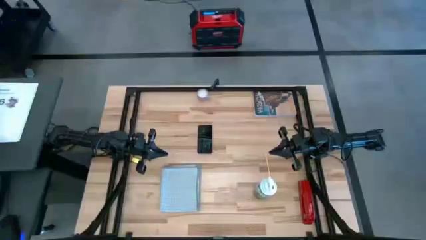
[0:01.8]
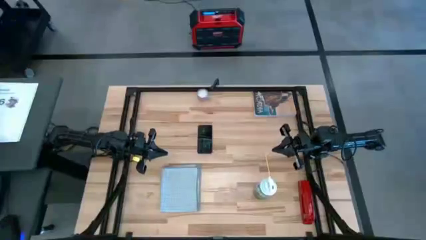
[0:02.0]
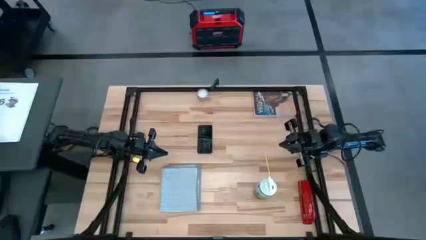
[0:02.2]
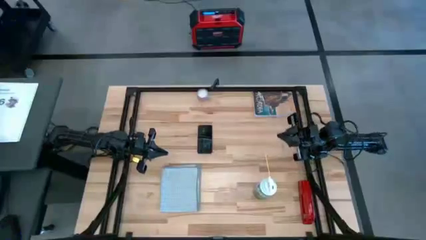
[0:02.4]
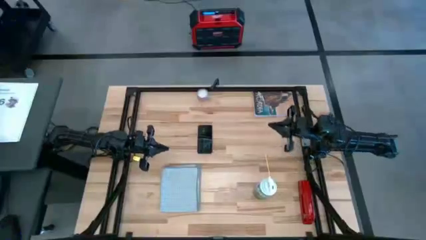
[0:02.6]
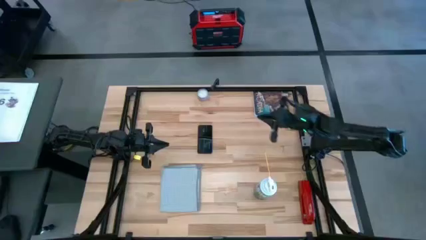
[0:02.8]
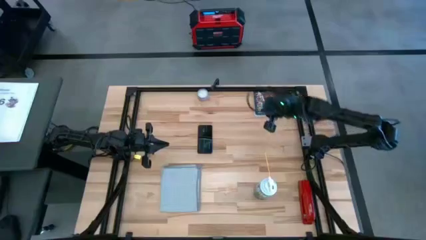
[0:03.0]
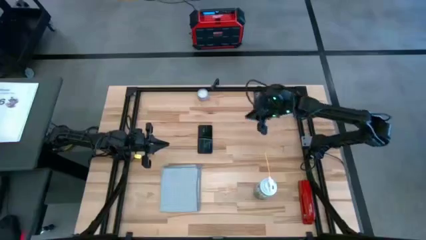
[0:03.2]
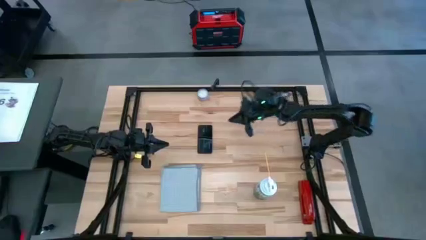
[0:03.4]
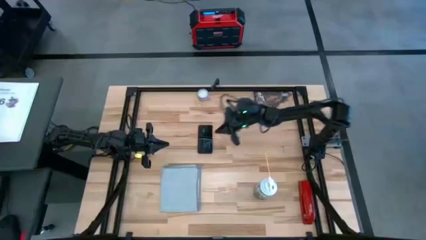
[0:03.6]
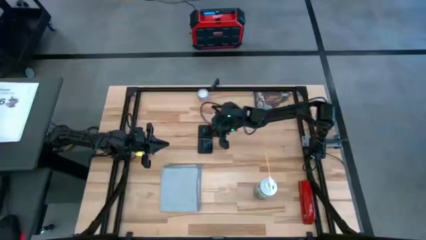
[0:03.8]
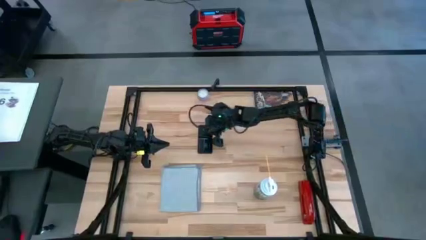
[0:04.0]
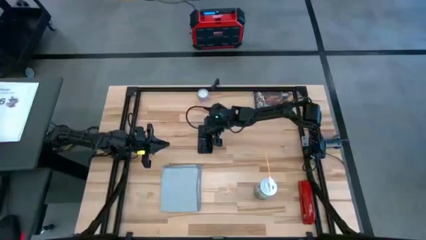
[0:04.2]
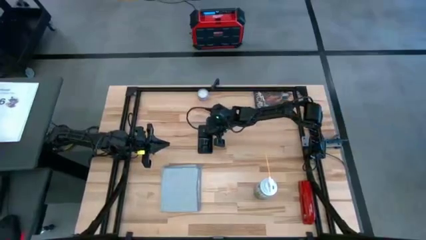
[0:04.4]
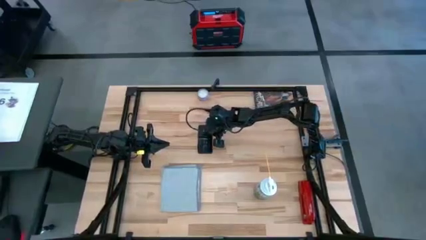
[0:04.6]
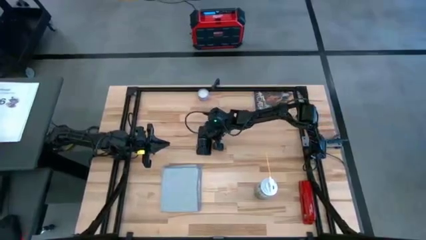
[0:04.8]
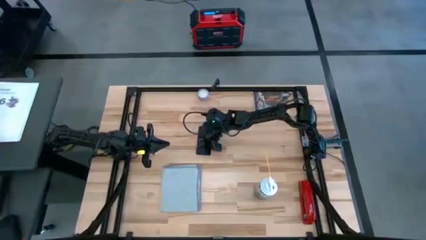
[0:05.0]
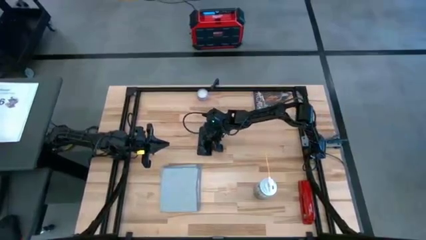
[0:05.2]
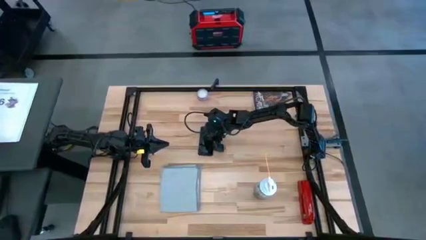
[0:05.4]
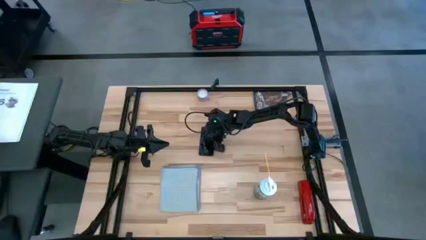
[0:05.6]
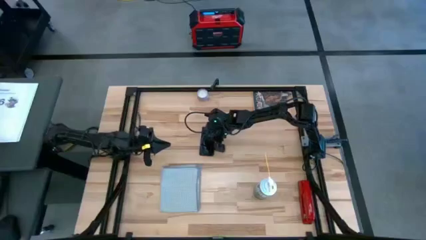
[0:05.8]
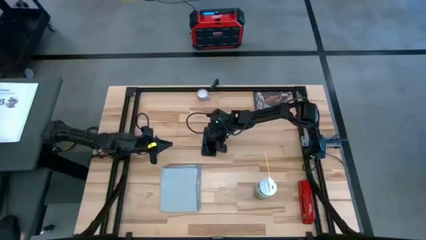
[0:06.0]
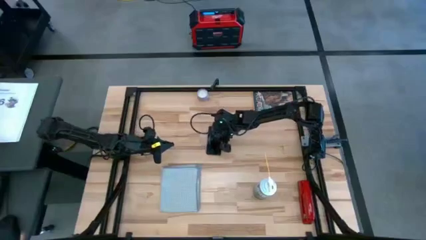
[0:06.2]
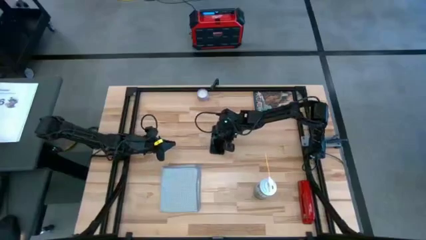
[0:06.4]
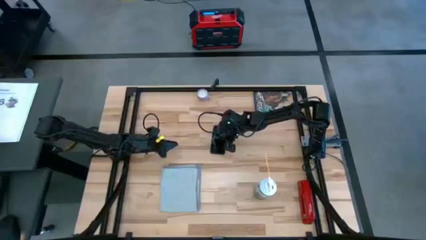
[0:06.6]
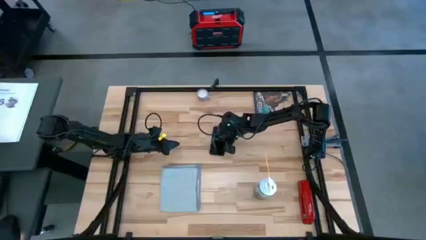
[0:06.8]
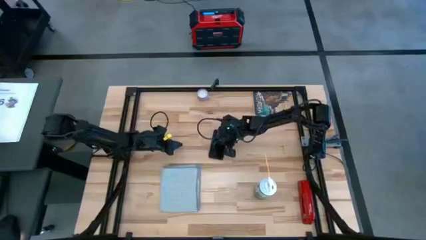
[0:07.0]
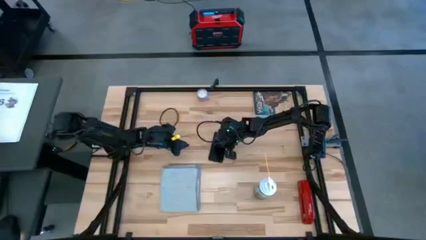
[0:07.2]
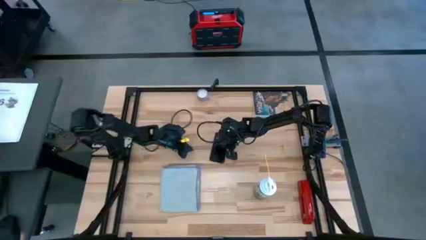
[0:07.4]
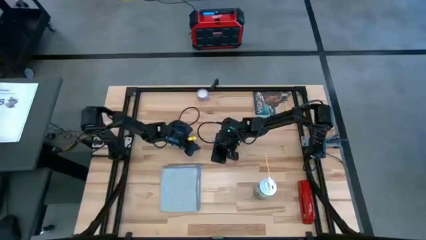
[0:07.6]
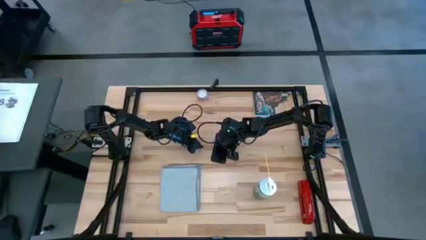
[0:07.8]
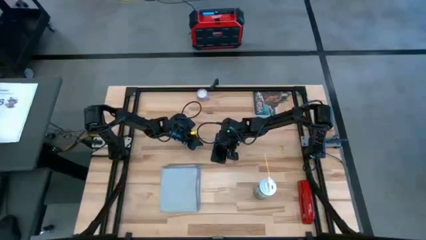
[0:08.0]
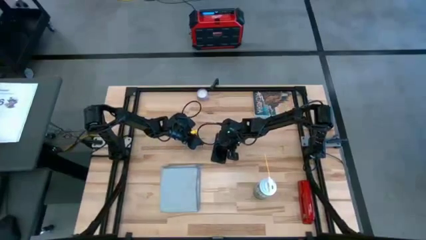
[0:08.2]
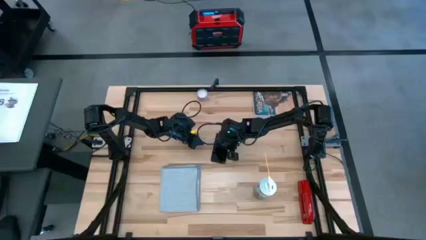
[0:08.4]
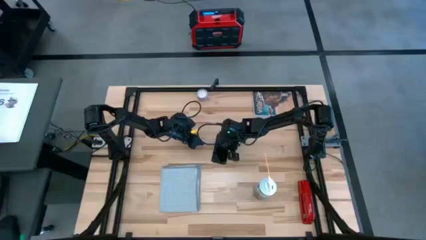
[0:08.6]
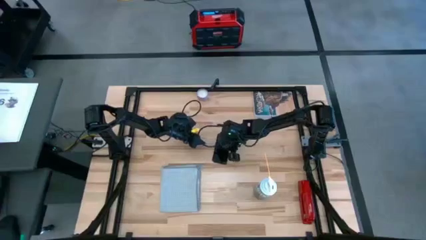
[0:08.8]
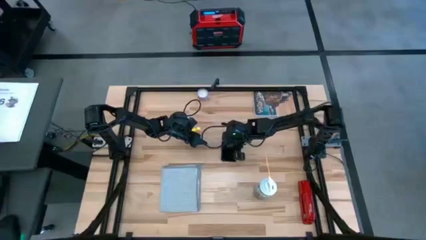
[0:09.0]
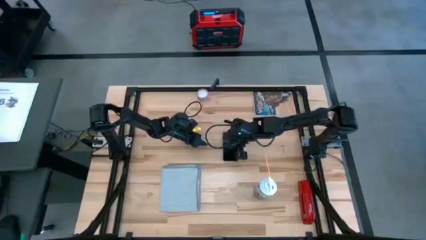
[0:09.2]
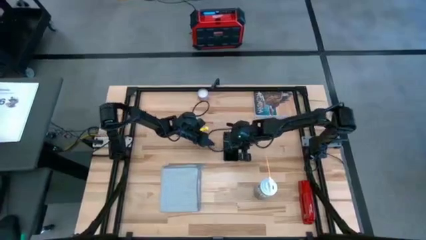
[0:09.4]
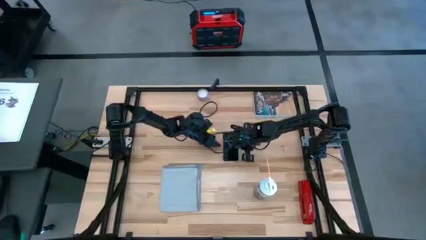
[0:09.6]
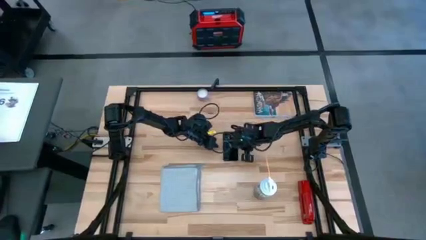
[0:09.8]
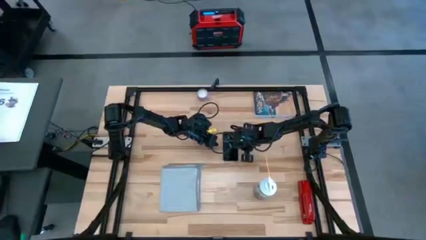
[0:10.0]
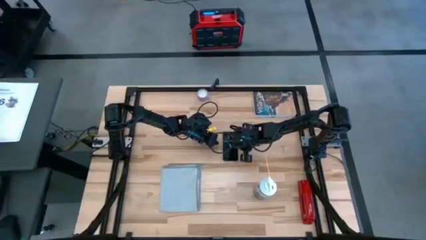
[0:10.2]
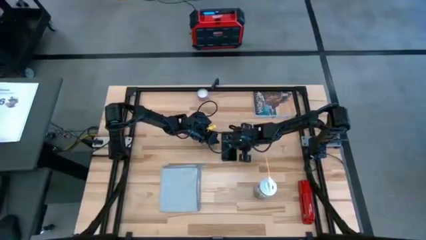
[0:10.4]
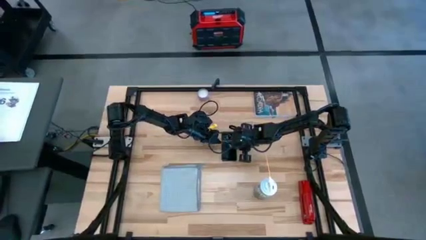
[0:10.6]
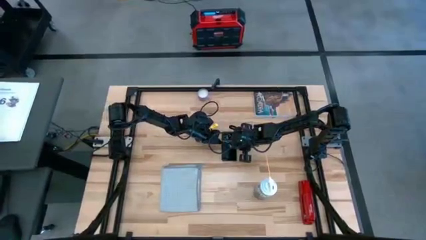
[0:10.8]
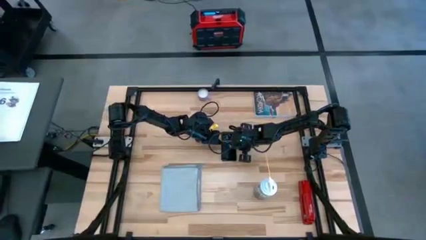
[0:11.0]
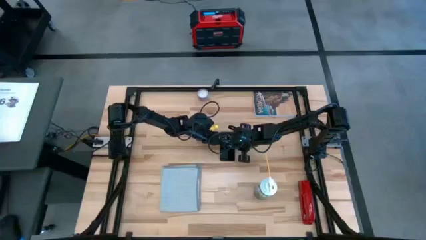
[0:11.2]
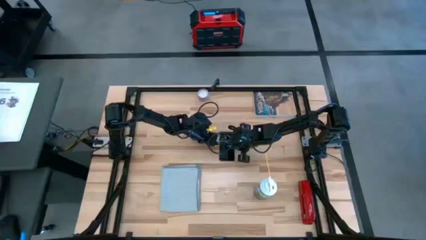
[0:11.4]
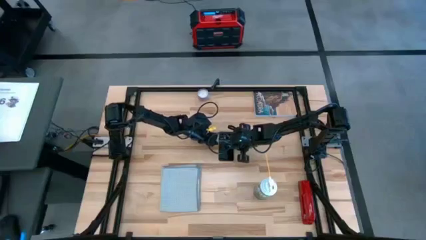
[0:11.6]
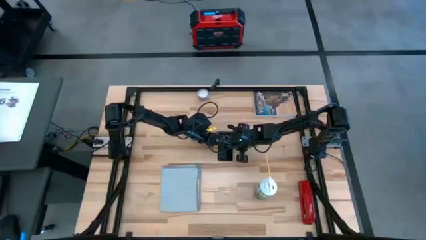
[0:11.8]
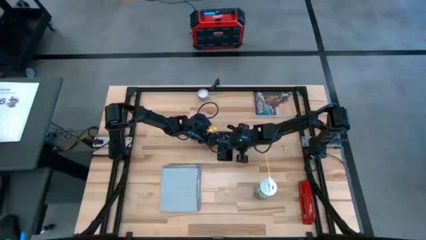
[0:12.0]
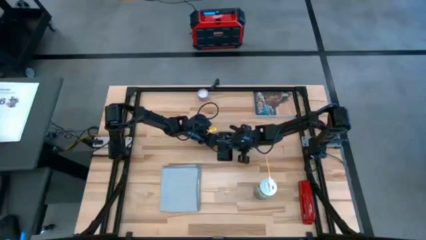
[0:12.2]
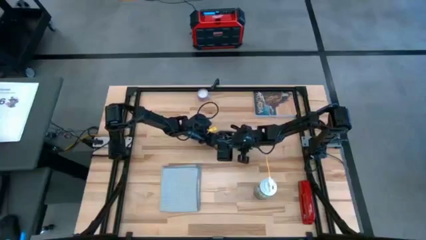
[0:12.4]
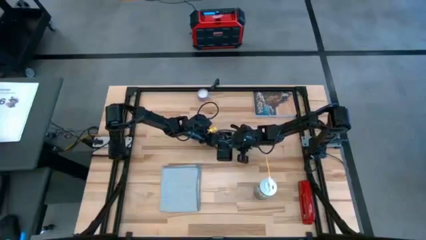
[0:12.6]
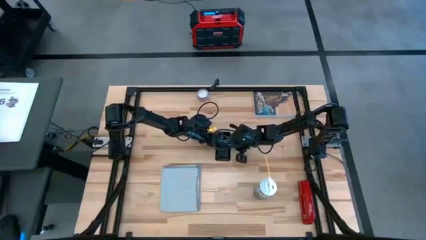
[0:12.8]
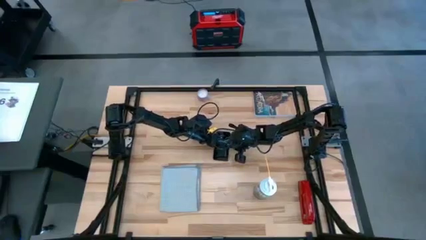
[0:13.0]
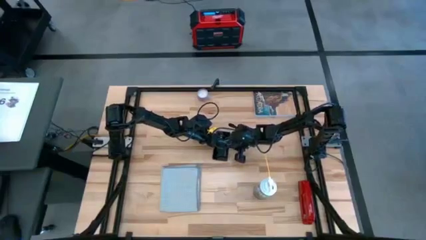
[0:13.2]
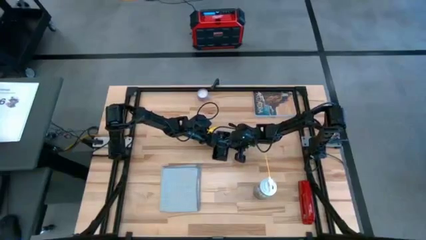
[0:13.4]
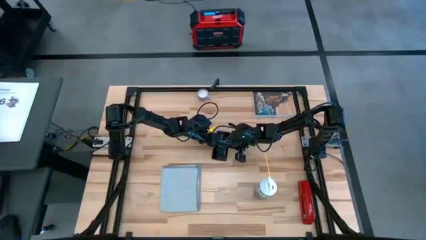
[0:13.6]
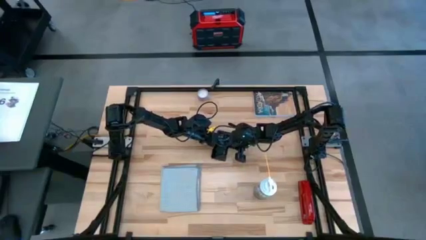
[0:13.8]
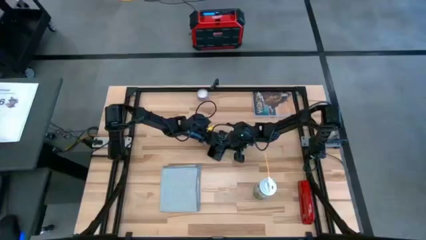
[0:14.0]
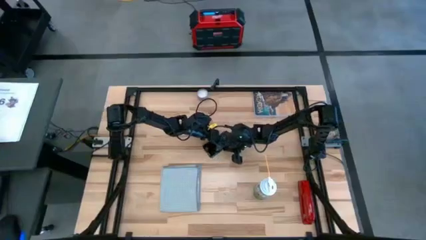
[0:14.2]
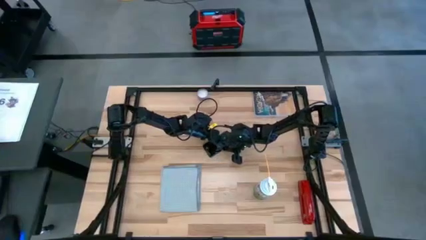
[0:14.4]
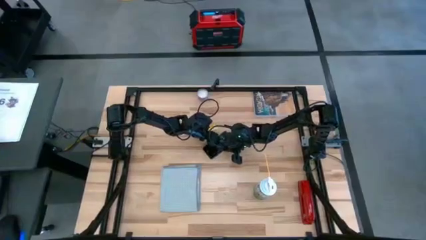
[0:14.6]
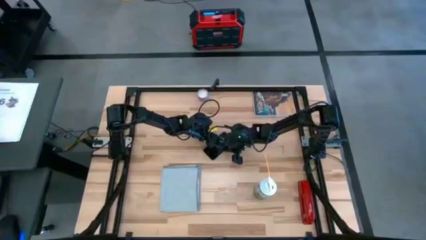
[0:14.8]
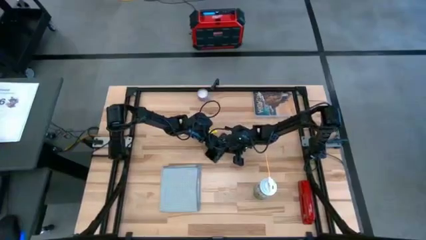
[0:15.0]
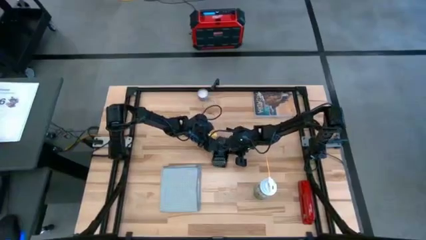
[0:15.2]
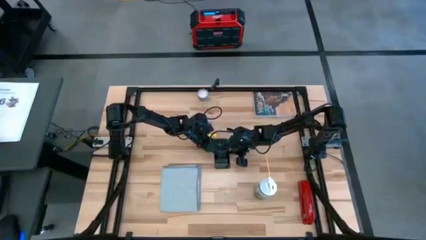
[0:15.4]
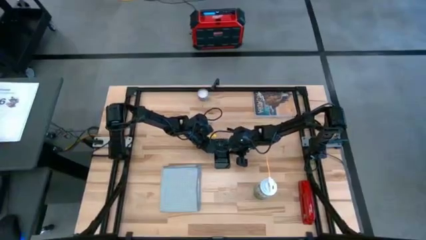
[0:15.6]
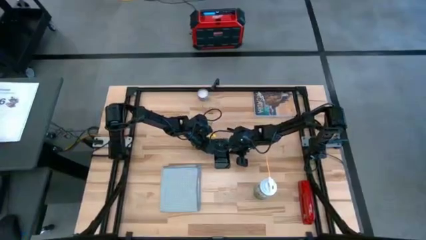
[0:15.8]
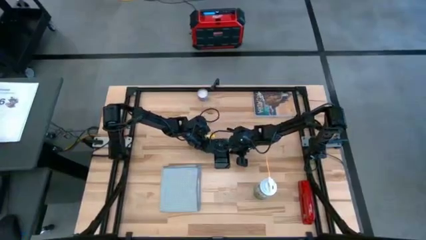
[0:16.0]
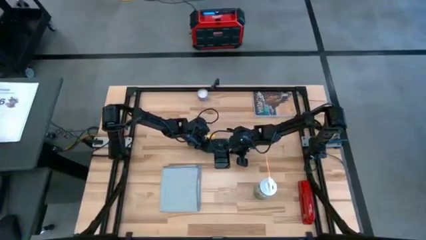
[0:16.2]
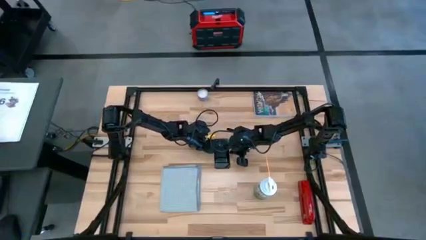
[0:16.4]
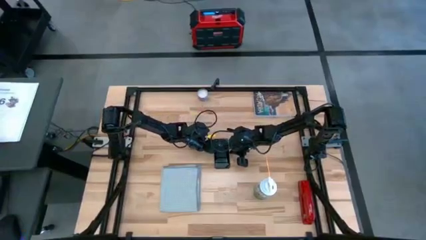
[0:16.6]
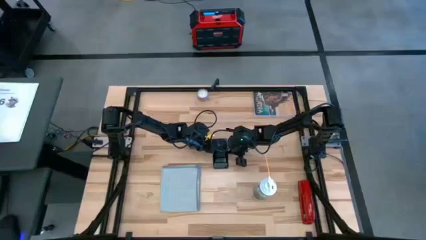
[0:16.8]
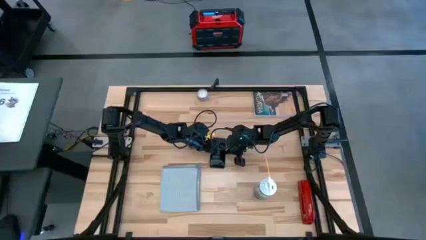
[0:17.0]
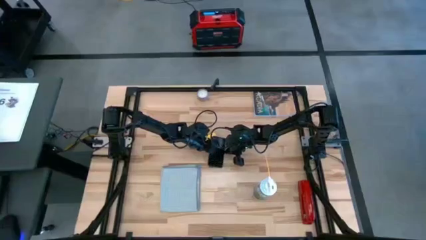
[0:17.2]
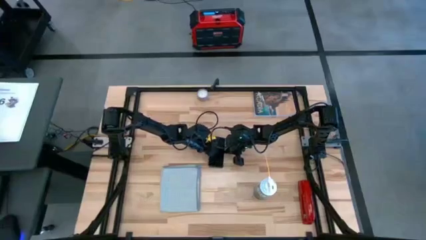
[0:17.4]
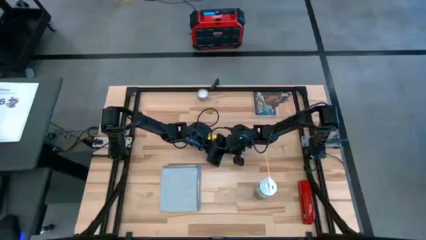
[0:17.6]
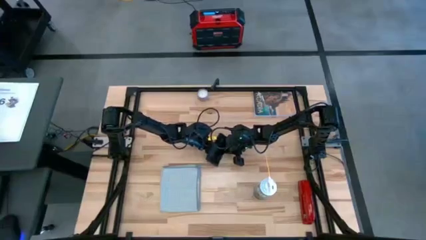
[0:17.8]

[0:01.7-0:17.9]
Task: Apply microfiber cloth
Spray the back of the cellphone with the cleaning bottle
